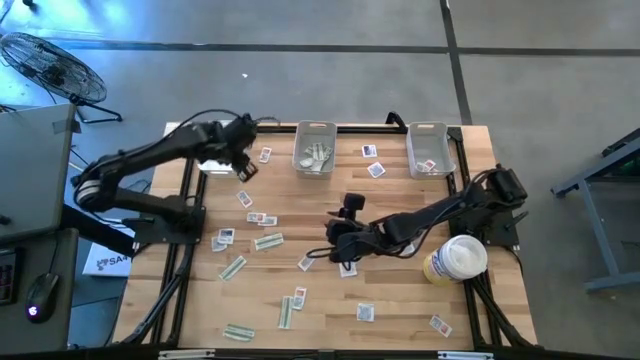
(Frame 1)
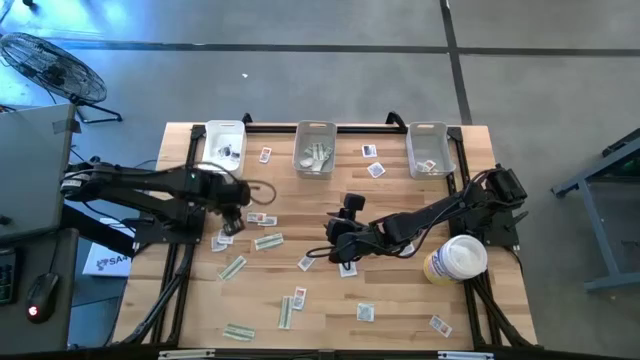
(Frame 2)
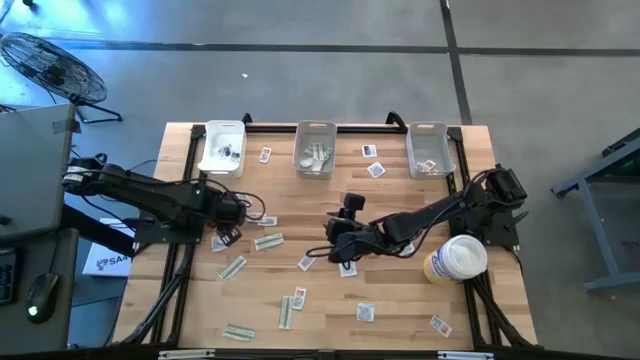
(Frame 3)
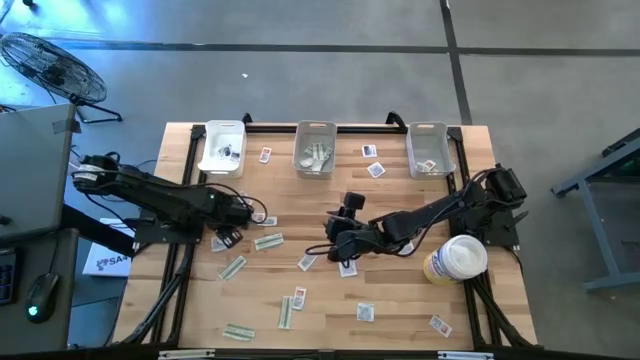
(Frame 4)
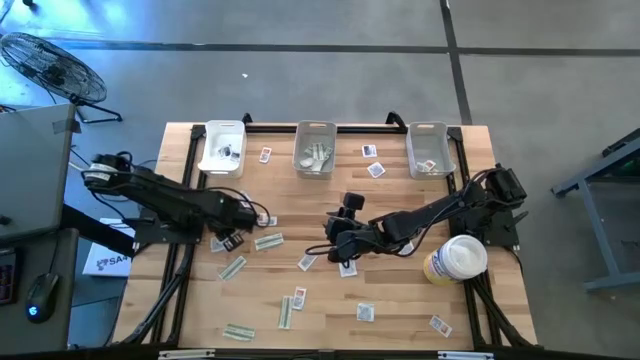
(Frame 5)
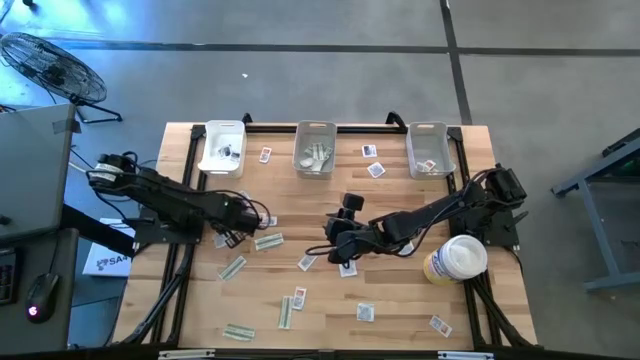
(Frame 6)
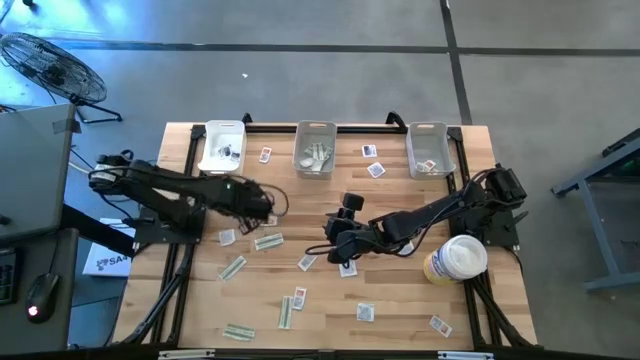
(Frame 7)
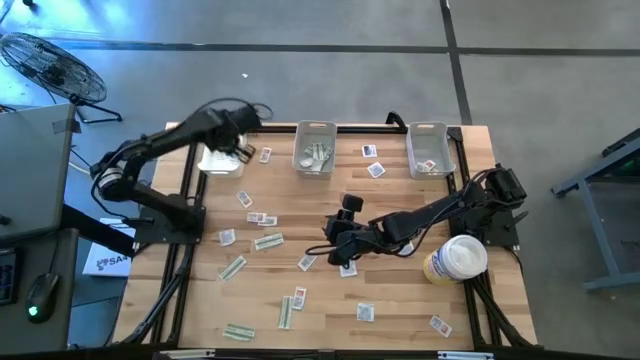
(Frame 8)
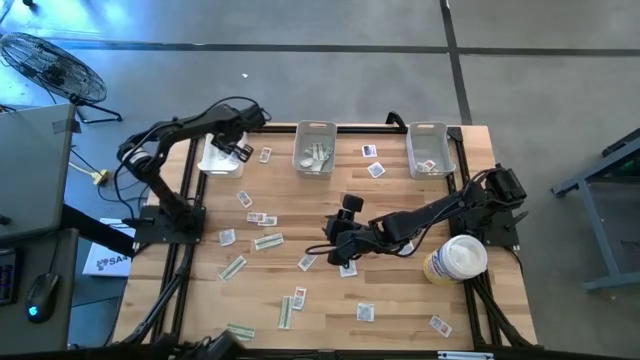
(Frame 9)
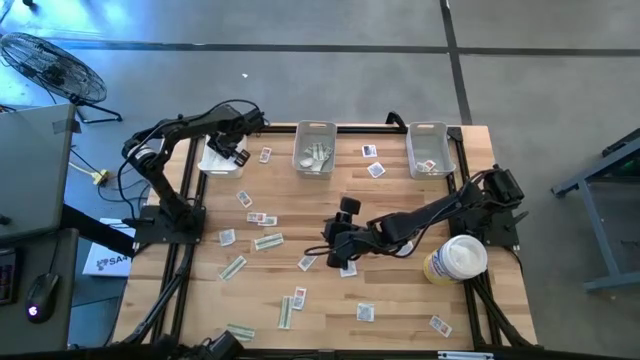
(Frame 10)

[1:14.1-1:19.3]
Task: Pick & Place First Aid Supplies
Put the blue pad into the white bin

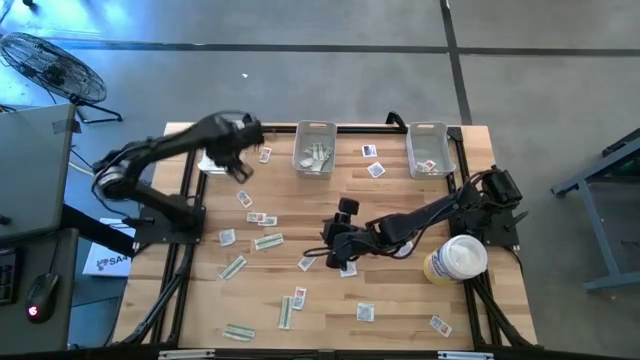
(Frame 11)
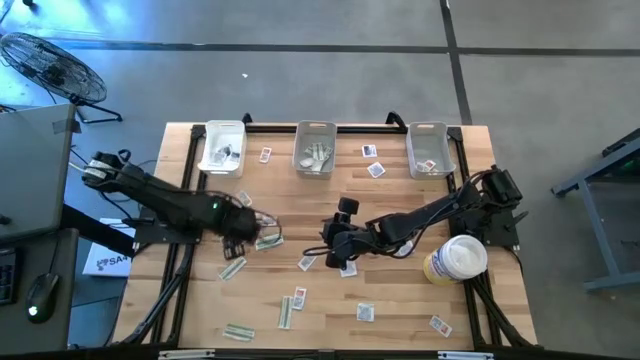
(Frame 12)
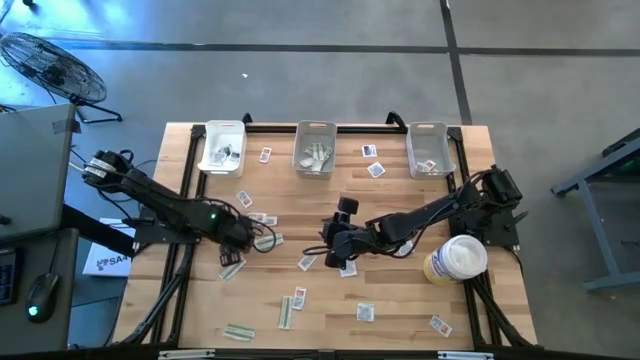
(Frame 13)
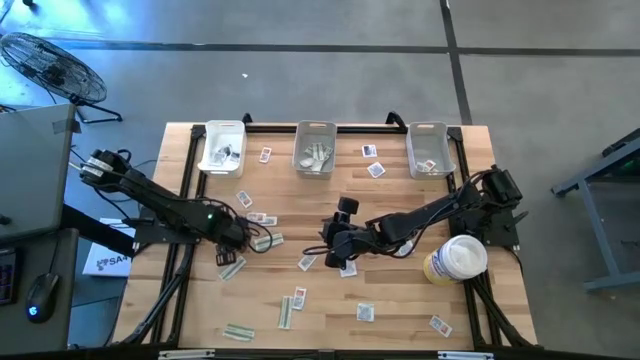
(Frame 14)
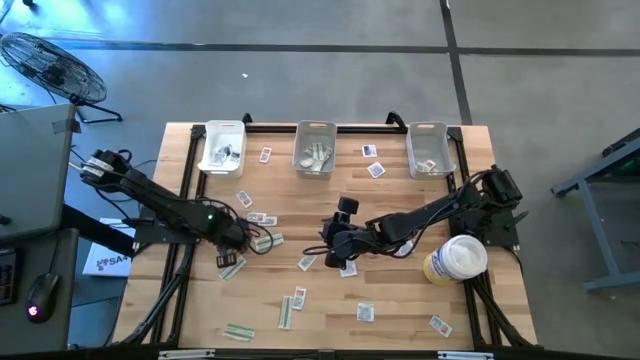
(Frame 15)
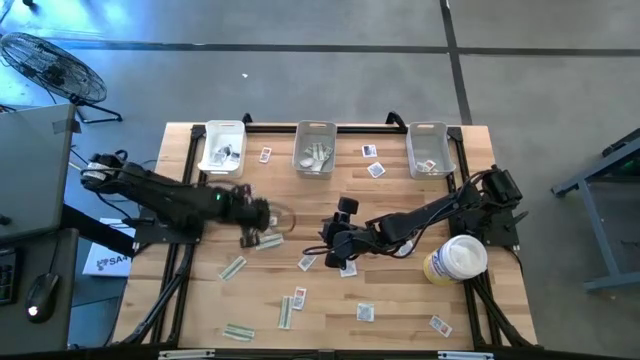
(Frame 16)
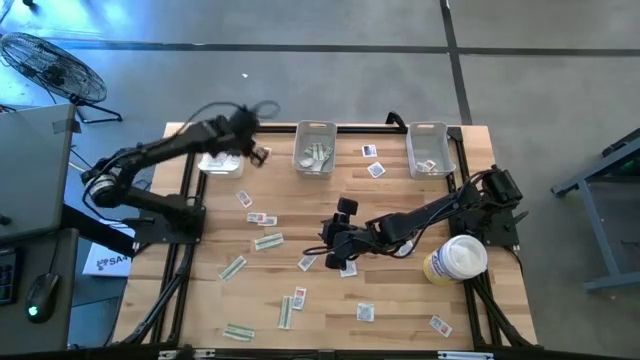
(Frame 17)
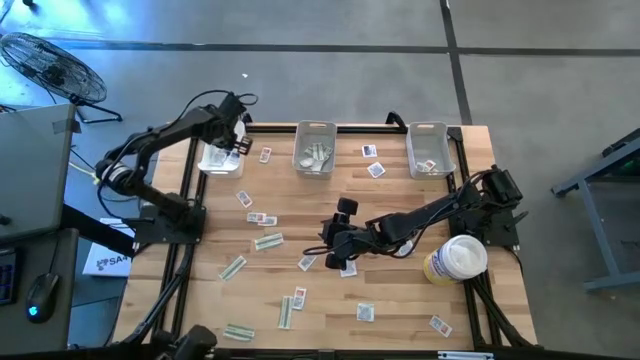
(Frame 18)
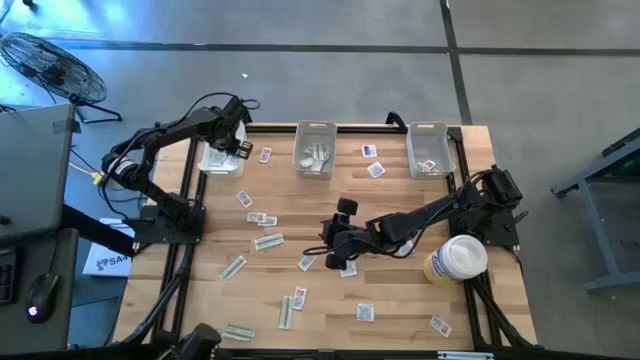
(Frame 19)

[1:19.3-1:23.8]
Put the blue pad into the white bin

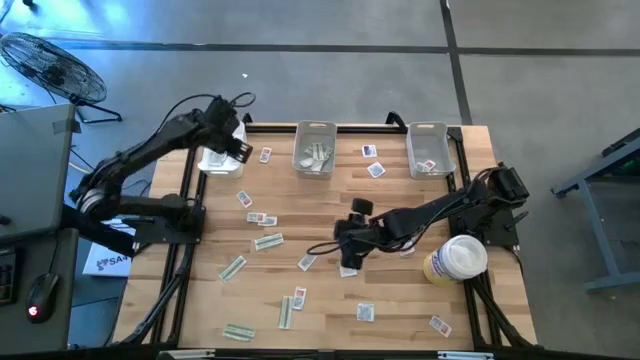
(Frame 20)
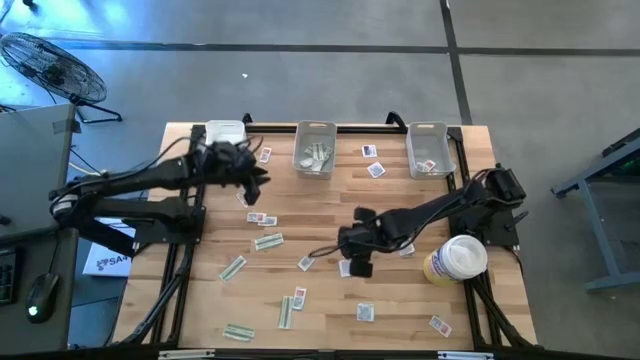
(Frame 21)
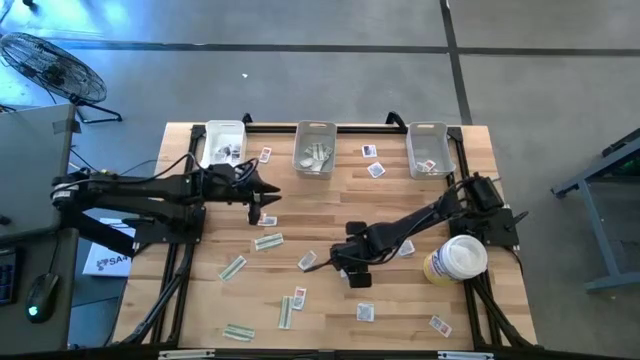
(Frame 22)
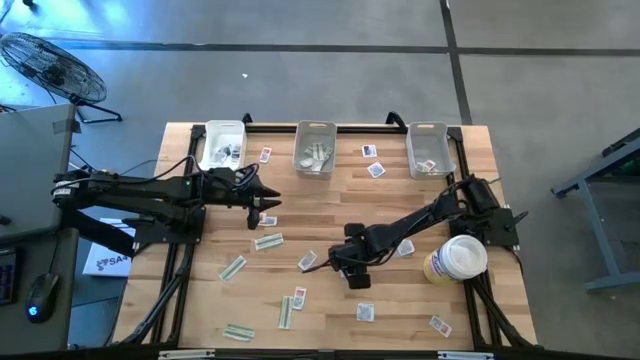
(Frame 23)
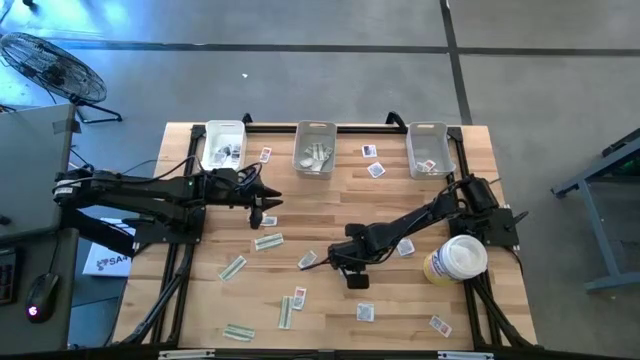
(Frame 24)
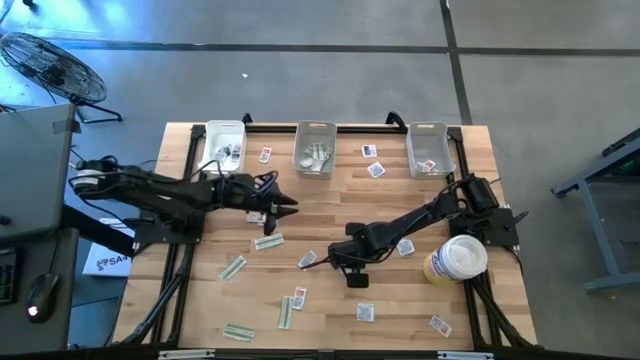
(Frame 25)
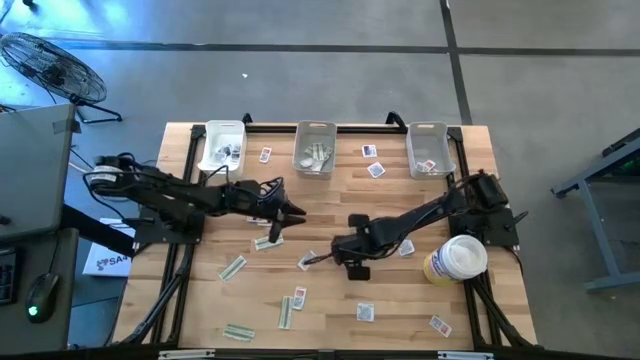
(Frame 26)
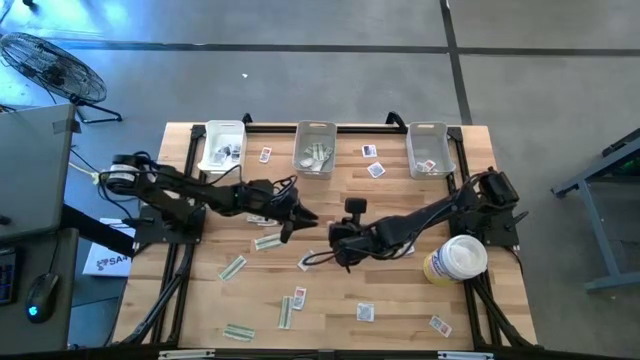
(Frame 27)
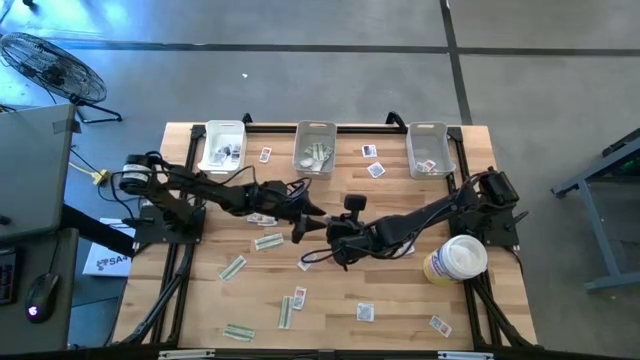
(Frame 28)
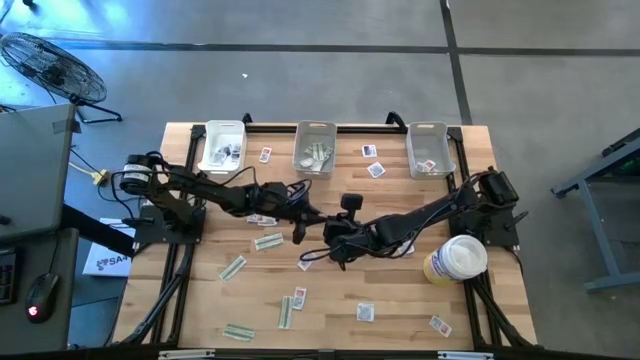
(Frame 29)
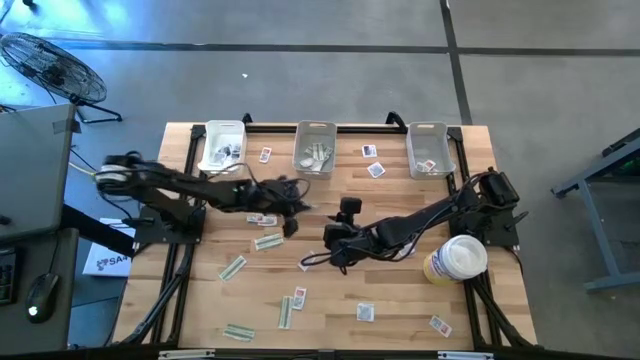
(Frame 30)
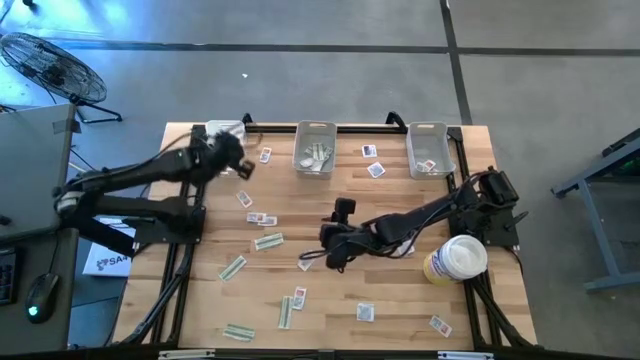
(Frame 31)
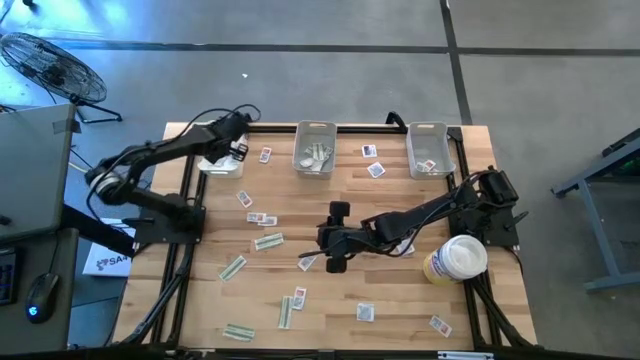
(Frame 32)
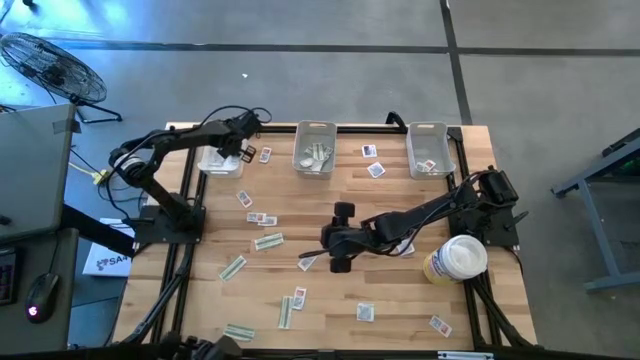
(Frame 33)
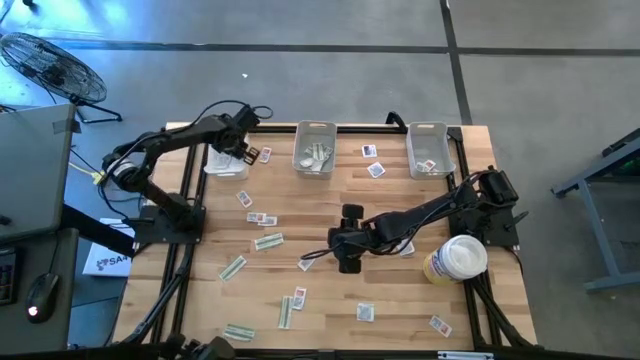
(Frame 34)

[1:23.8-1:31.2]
Put the blue pad into the white bin

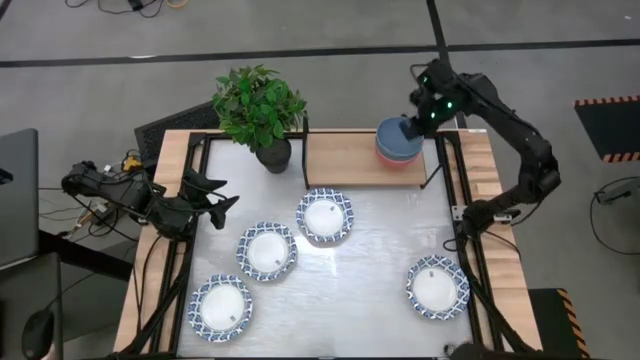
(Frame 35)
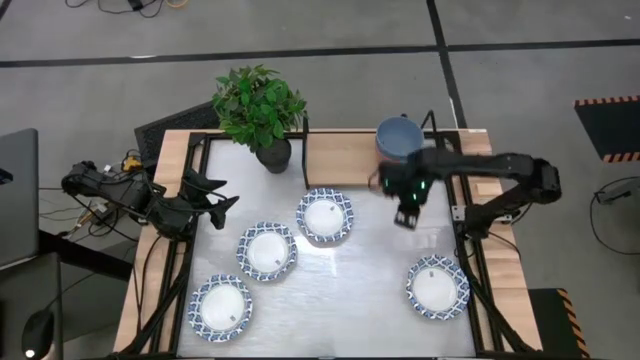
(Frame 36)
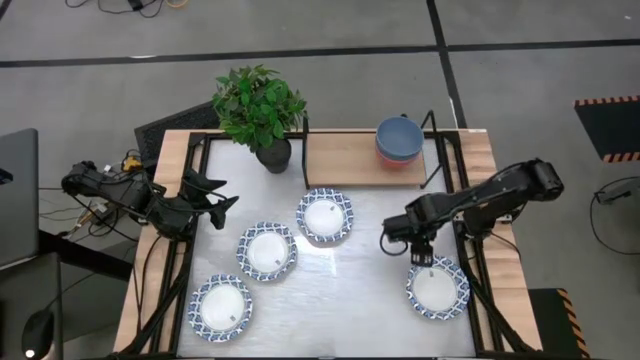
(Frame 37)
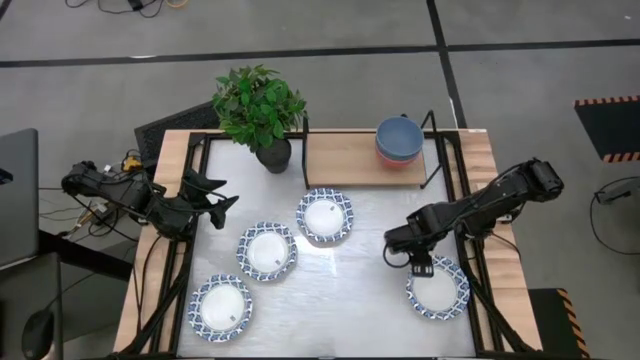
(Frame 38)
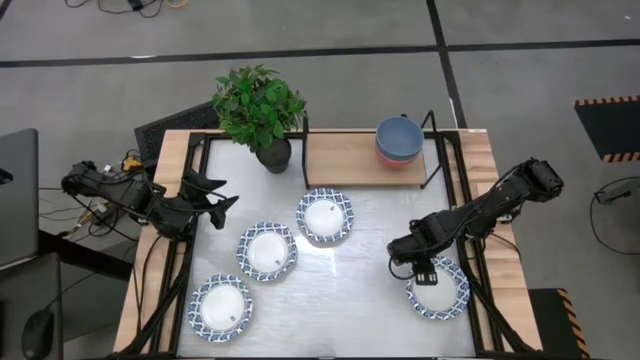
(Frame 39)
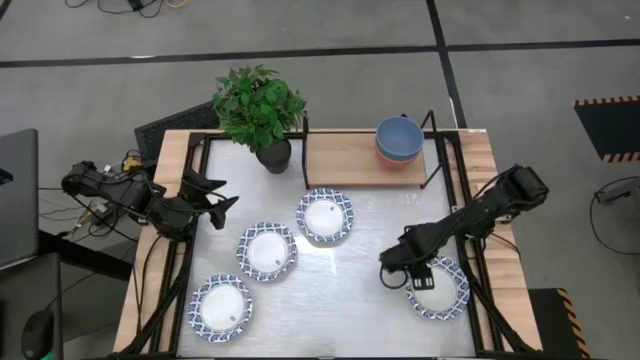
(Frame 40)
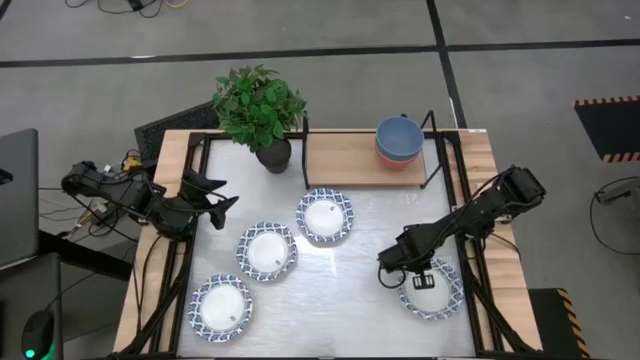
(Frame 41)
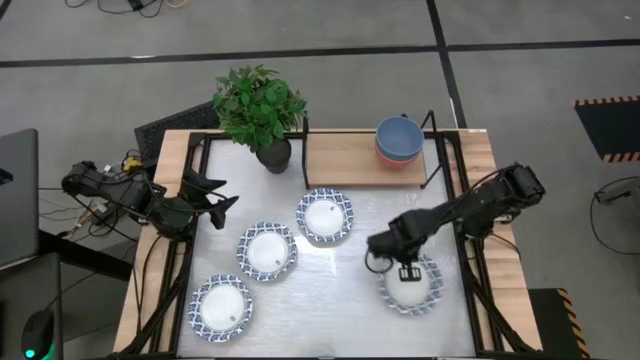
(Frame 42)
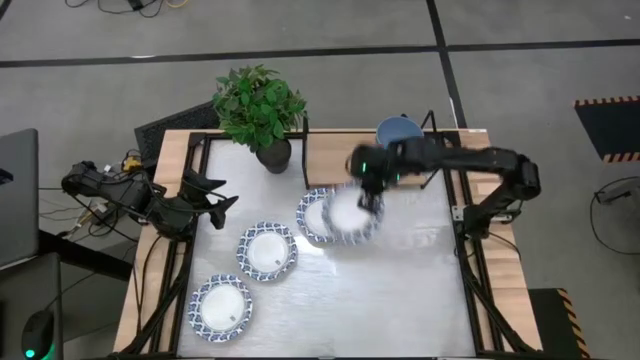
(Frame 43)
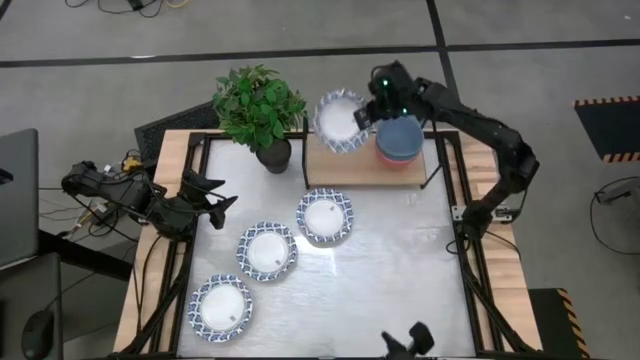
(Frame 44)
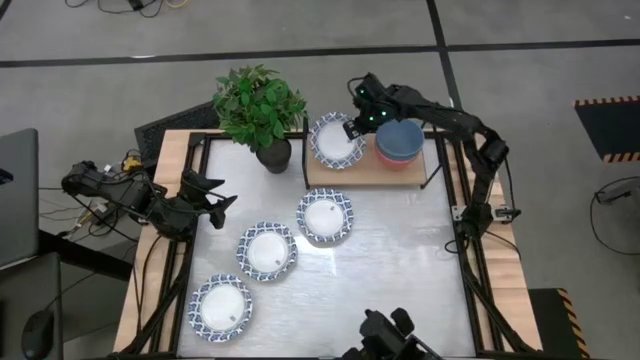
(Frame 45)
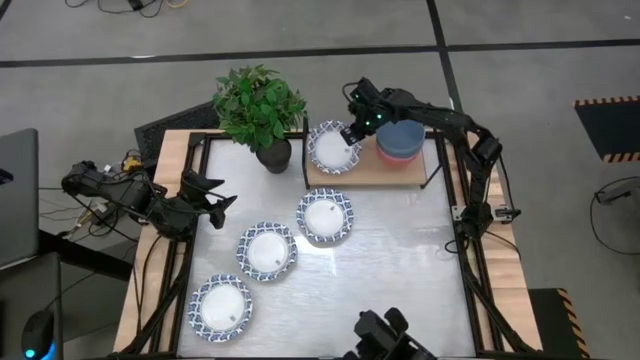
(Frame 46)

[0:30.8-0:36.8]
Task: Place and stack bowls onto a shelf
Put the white bowl on the shelf
